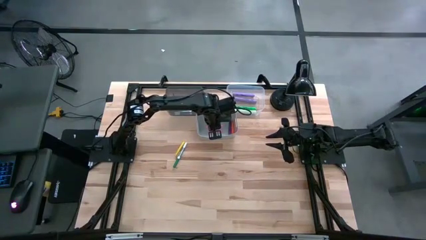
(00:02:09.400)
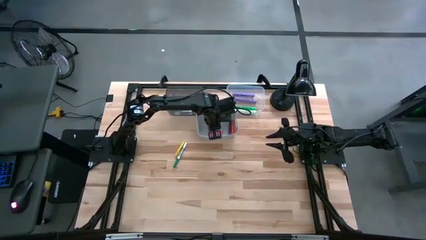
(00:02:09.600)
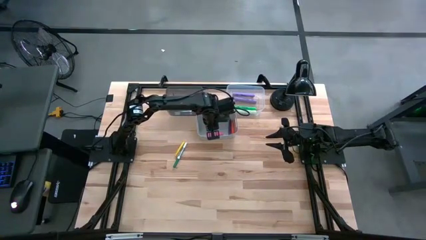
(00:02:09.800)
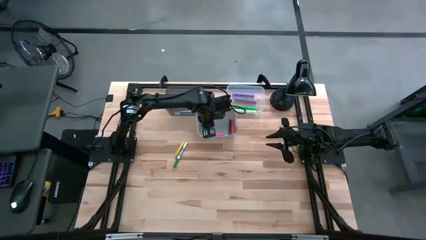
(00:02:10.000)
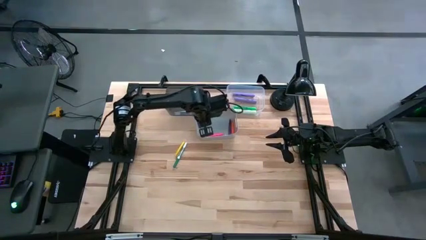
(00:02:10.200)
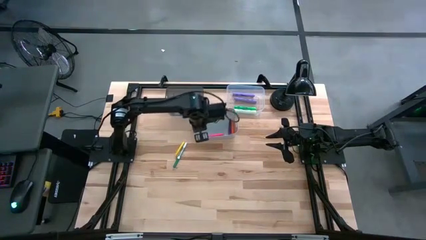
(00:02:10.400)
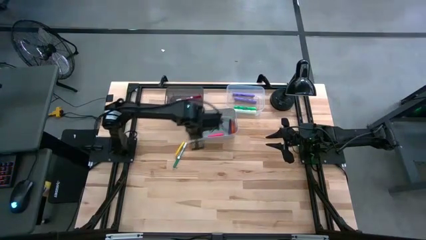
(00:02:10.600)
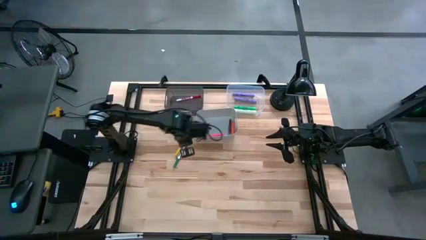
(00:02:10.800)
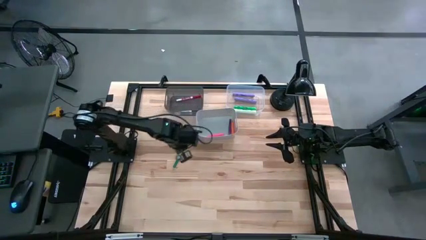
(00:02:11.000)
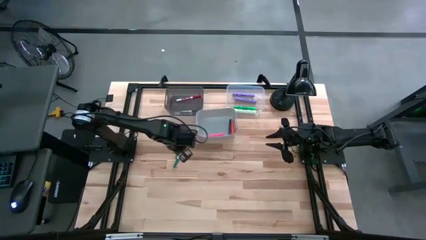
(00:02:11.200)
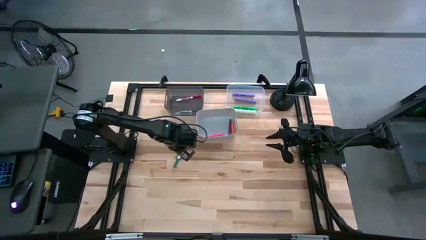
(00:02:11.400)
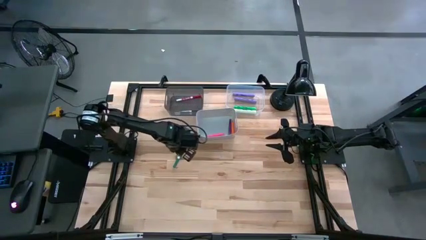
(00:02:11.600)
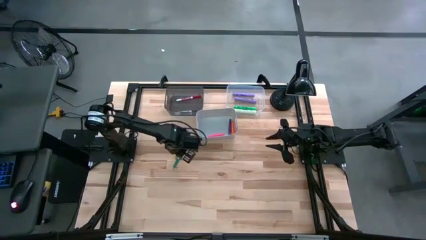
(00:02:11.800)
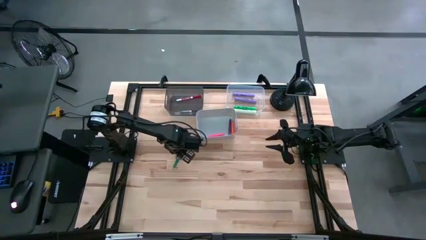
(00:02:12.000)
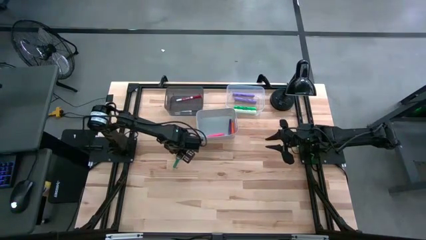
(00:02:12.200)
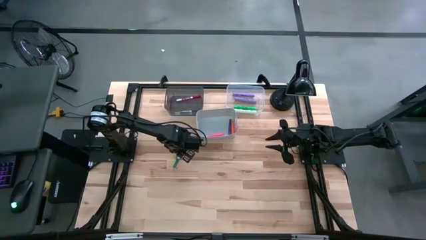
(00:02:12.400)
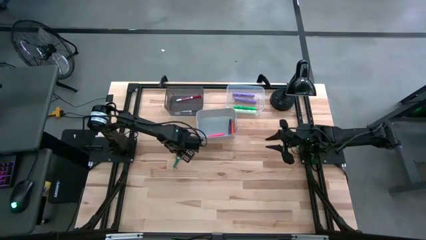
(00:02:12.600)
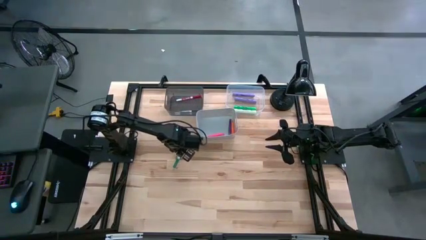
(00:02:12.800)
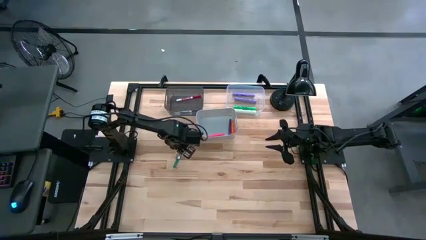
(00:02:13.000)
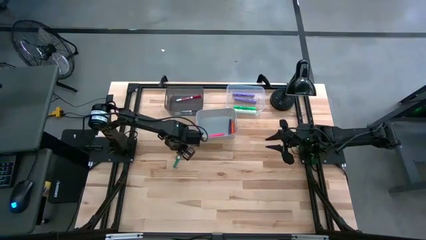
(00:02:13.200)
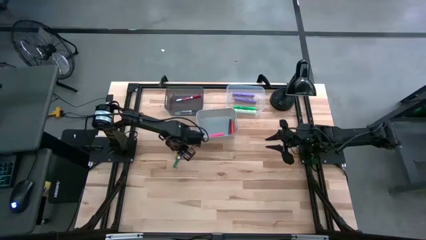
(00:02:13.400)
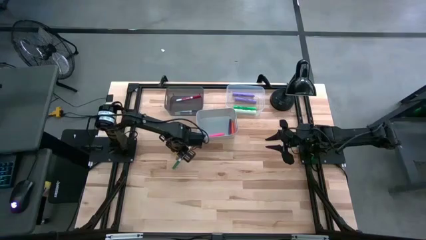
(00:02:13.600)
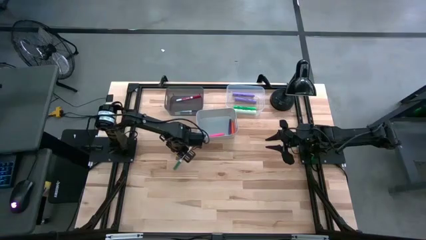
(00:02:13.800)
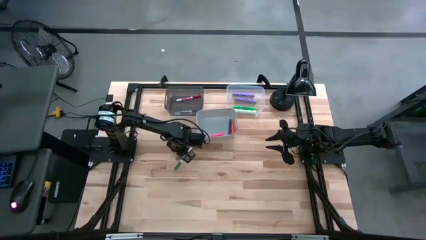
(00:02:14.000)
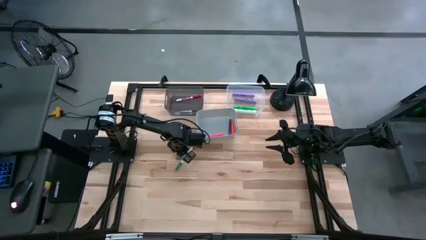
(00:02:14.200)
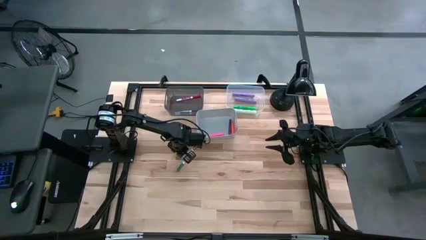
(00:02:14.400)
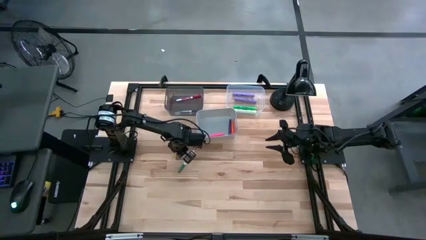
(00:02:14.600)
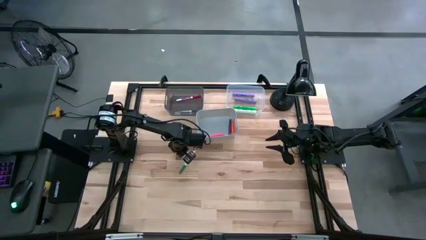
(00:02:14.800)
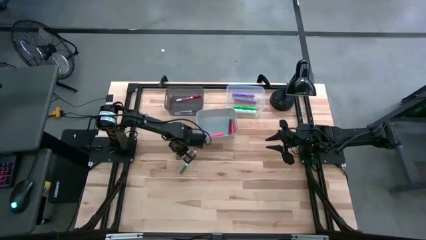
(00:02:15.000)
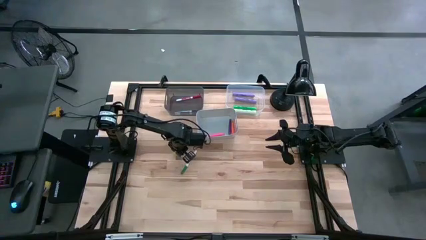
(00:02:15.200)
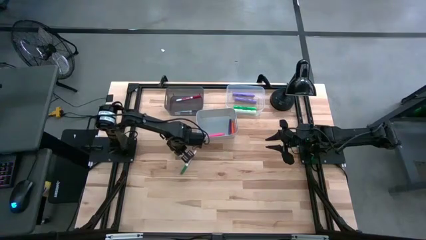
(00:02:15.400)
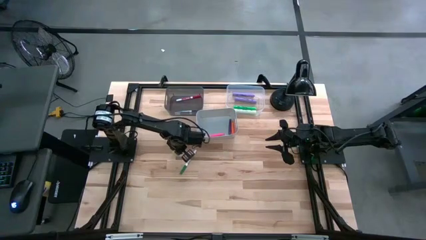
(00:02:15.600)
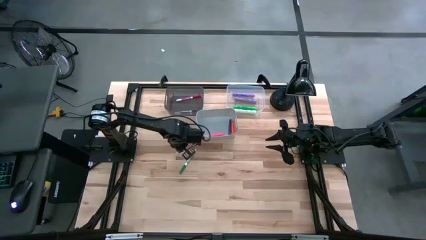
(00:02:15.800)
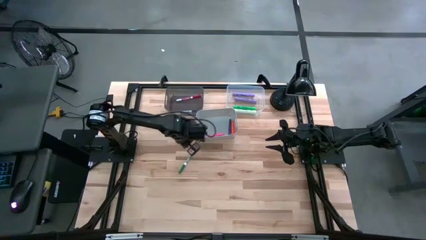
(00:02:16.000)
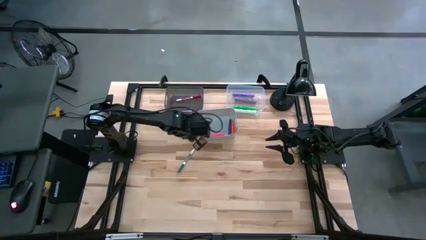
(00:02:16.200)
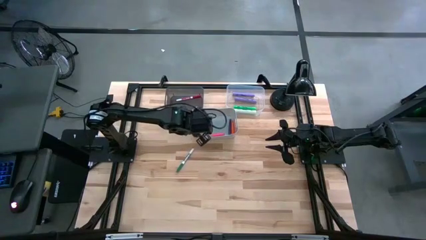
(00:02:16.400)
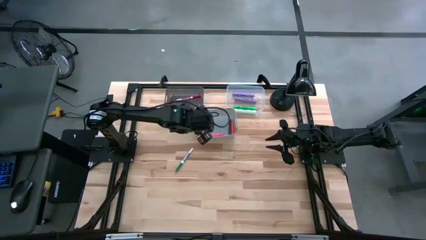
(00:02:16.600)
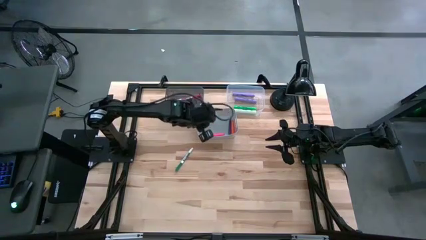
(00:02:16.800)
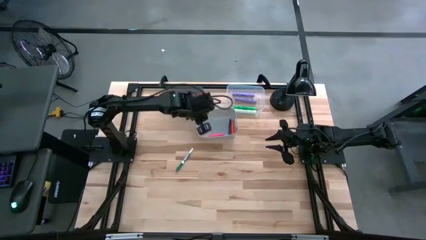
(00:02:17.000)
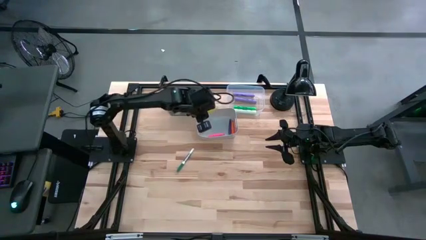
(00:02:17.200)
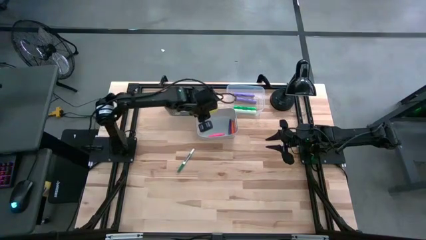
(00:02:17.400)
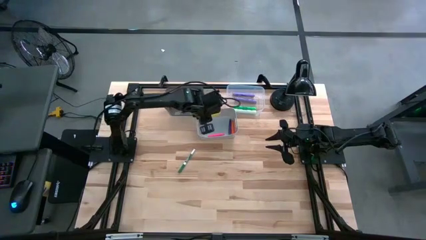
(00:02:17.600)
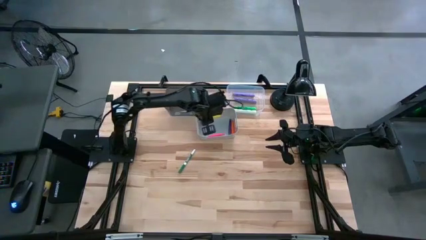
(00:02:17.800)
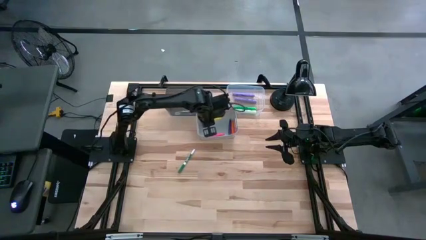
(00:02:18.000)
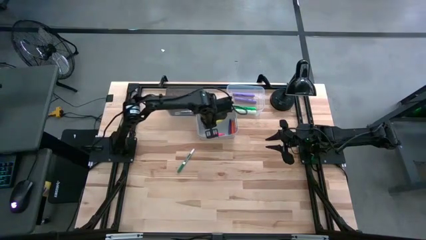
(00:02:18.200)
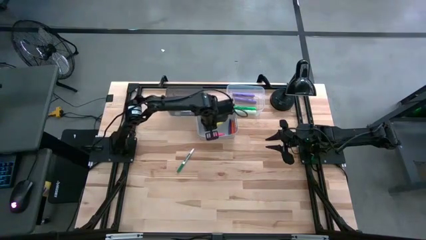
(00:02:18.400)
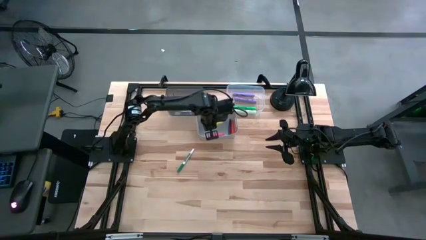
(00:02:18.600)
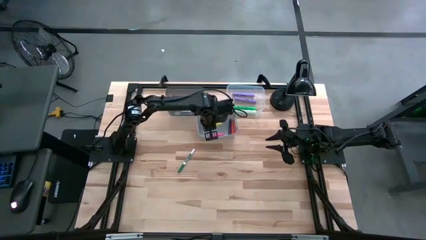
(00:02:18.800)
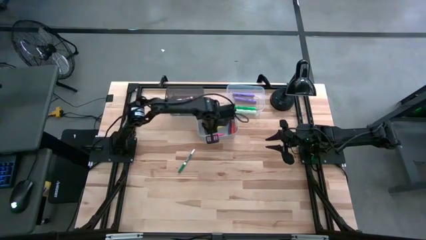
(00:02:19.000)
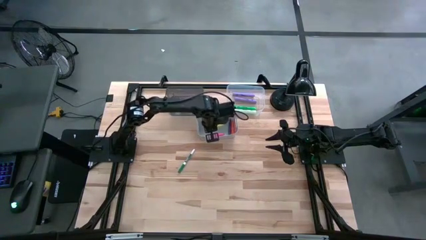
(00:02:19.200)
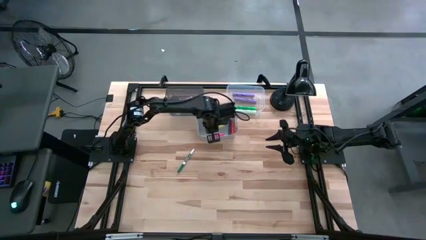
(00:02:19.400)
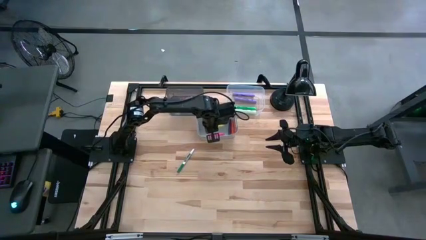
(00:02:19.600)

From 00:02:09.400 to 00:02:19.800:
Task: Pick & Place Markers
Put the yellow pen into the gray bin

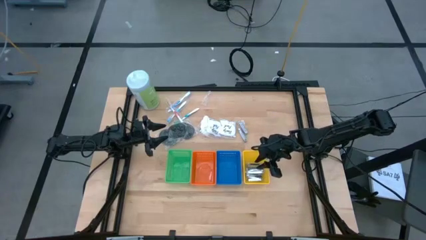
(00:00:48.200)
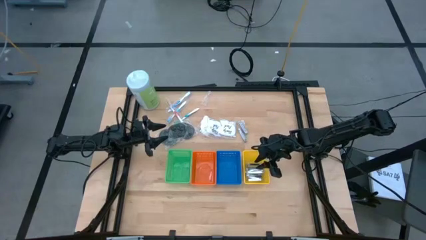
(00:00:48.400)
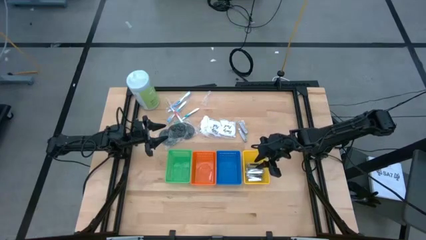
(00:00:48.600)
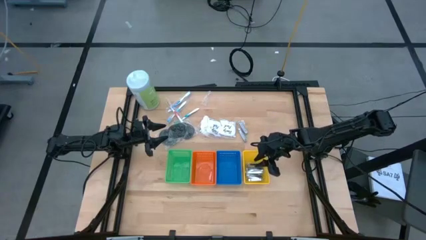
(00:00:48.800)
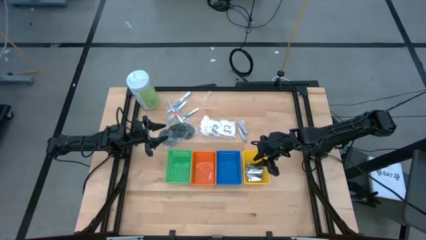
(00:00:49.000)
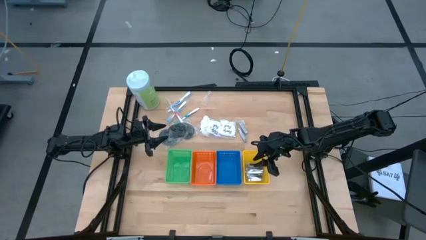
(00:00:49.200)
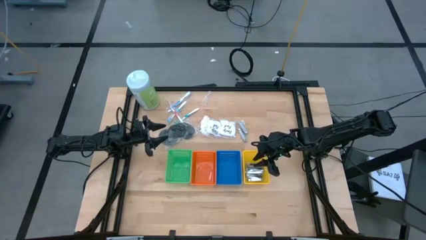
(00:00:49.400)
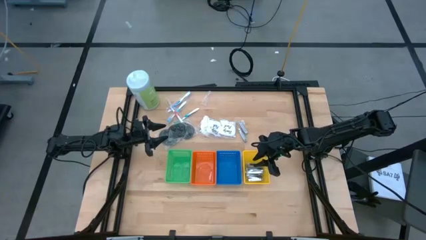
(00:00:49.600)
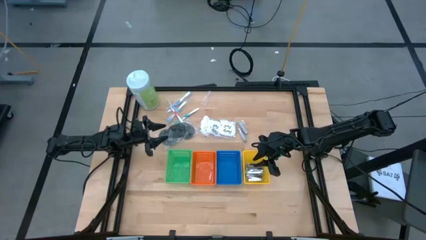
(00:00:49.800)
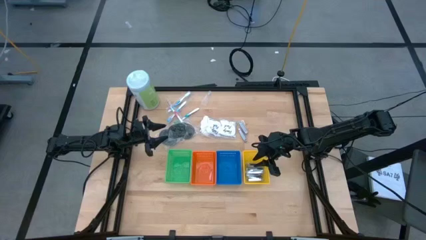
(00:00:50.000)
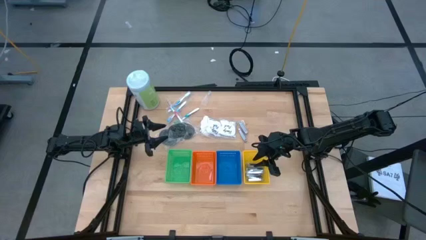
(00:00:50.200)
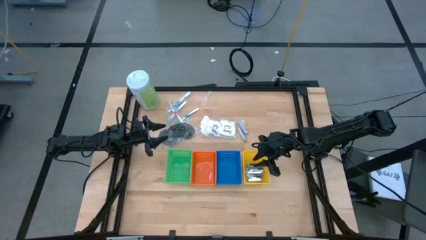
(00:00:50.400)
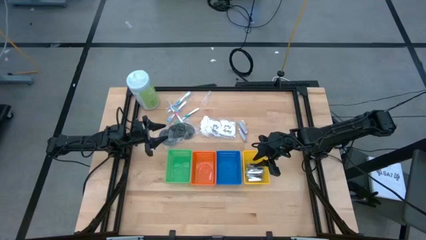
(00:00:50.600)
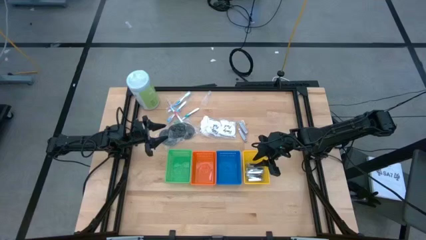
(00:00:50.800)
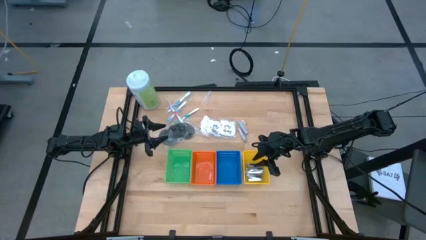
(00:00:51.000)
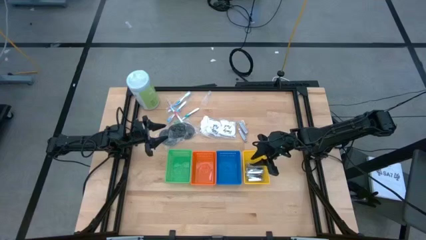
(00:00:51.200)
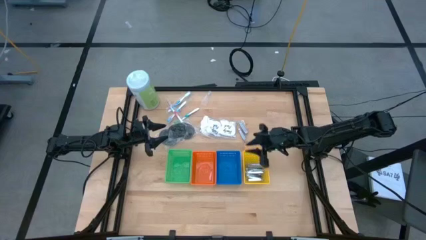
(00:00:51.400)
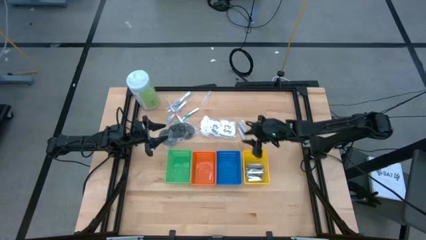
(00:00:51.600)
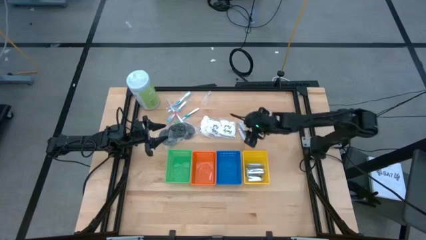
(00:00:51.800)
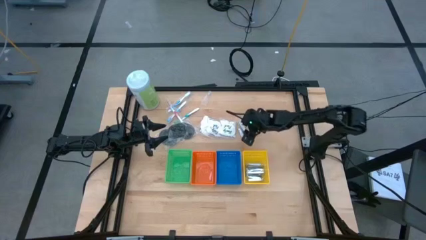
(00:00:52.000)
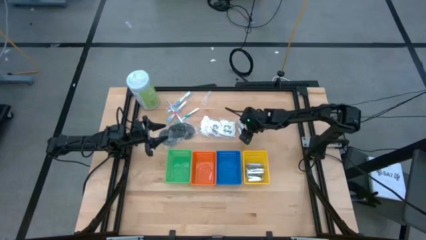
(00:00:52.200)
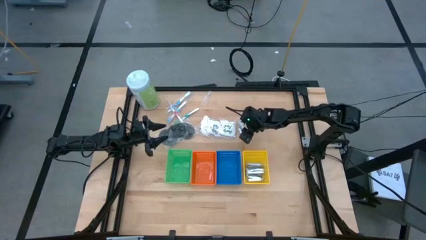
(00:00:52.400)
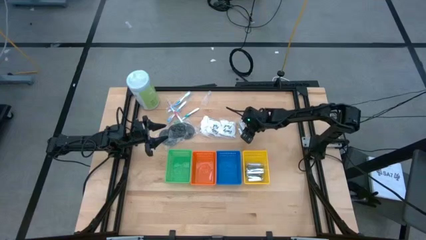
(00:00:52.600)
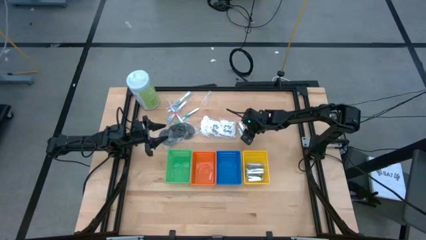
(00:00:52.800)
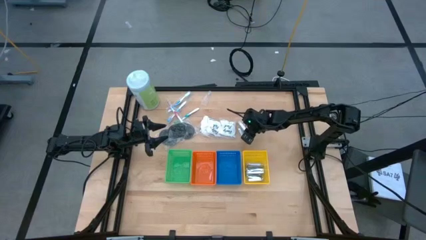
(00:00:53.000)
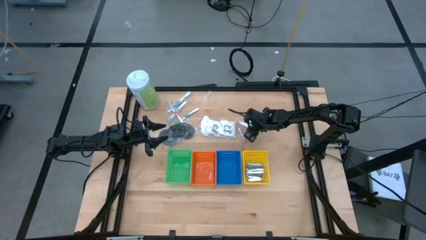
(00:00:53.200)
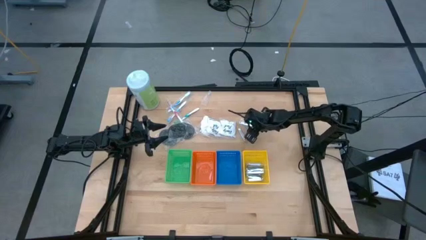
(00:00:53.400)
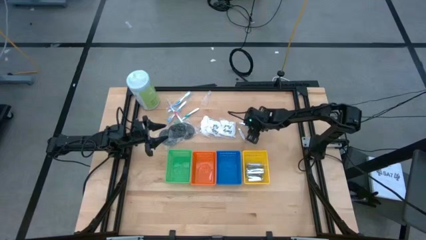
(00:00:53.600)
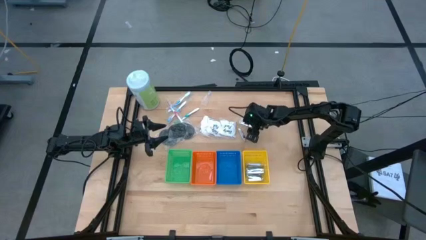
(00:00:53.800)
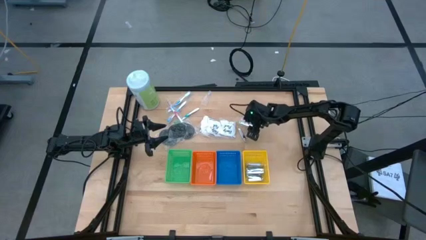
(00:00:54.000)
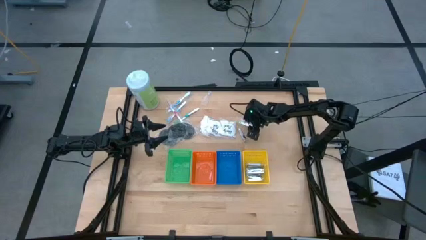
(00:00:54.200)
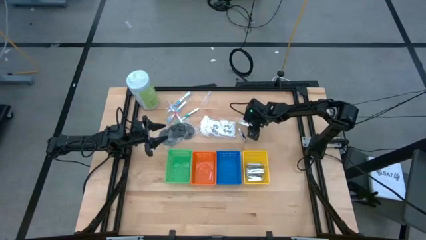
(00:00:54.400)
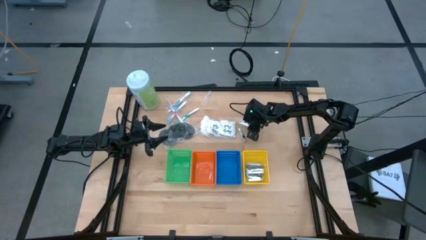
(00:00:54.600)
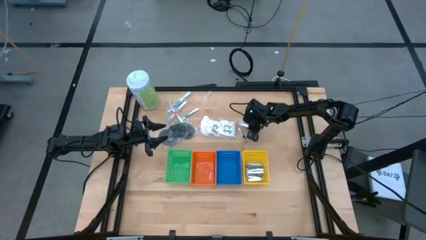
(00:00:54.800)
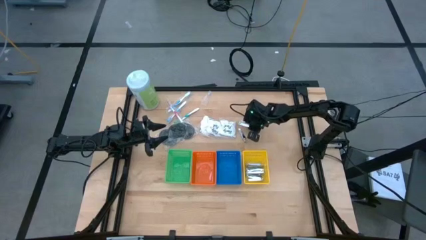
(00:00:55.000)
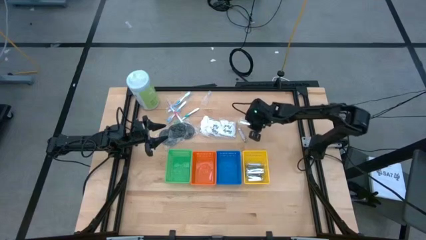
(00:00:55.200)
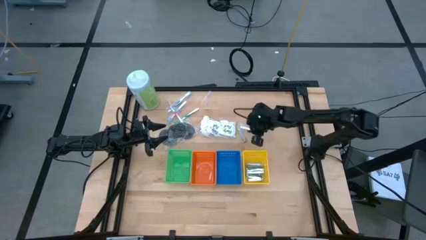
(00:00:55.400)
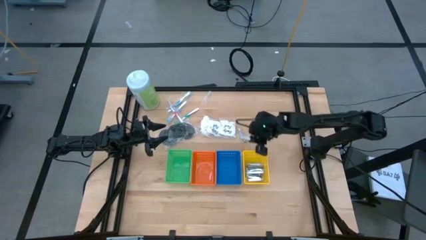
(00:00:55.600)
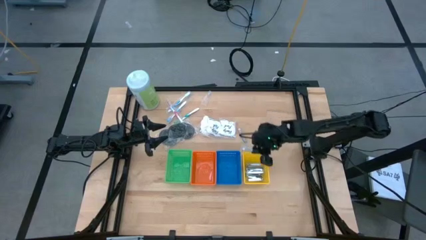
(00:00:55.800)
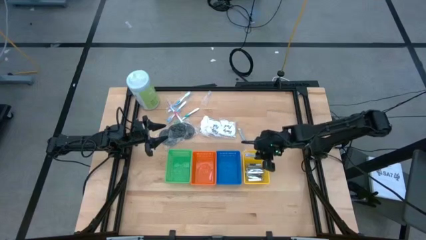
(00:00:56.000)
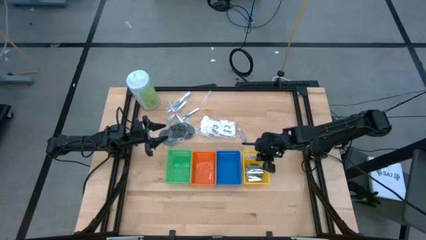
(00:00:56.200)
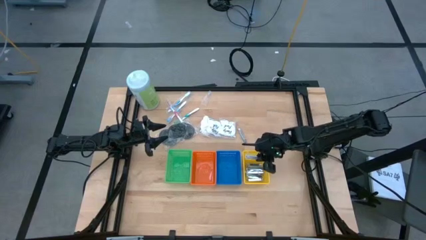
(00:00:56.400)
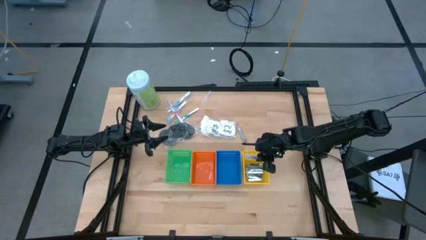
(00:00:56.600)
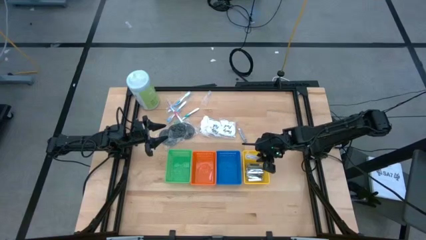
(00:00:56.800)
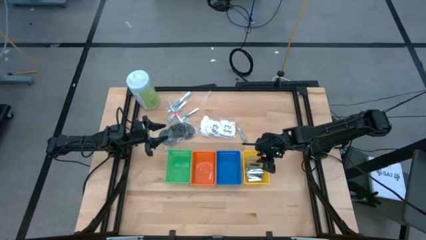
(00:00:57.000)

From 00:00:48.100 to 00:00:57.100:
Task: Pick & Place Travel size toiletries
Put the silver nail cutter into the yellow basket
